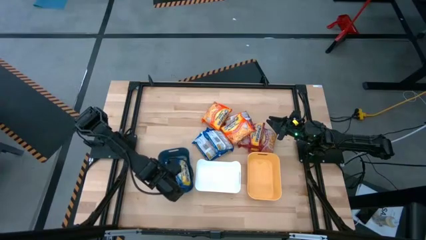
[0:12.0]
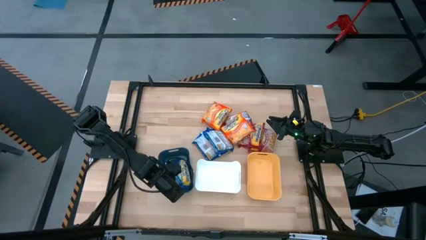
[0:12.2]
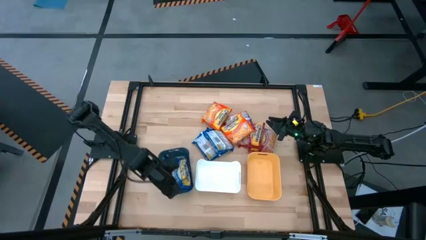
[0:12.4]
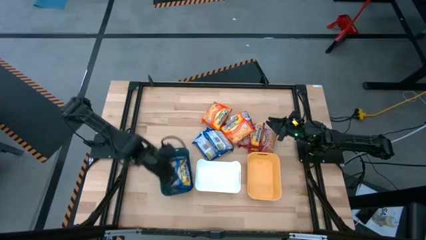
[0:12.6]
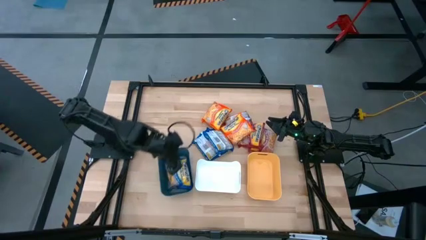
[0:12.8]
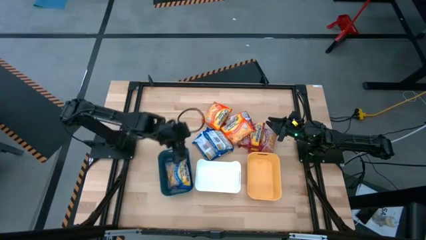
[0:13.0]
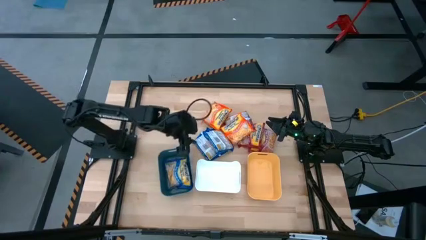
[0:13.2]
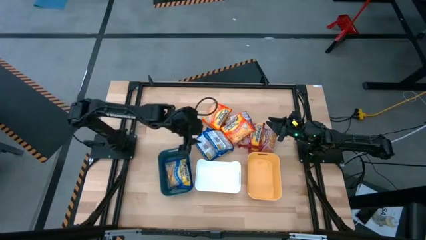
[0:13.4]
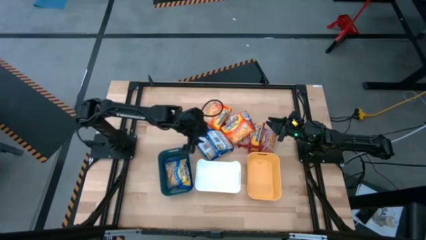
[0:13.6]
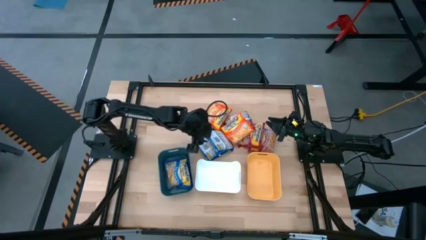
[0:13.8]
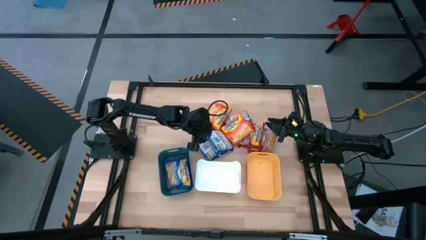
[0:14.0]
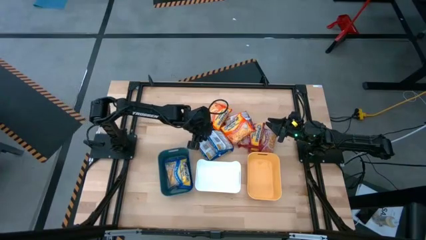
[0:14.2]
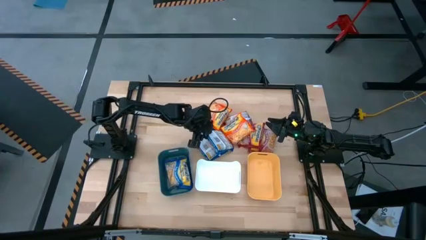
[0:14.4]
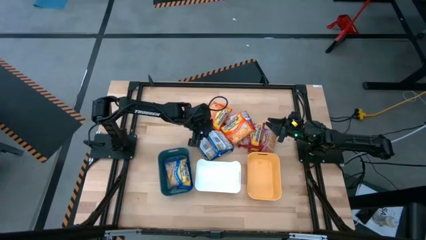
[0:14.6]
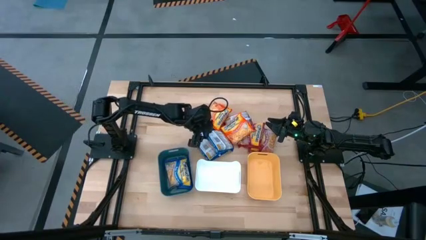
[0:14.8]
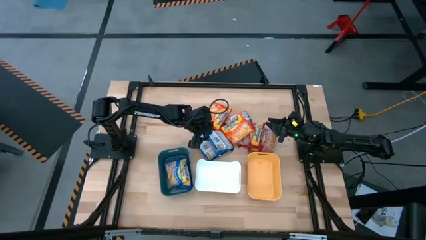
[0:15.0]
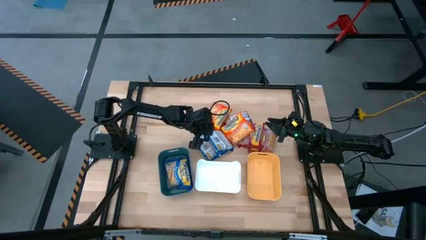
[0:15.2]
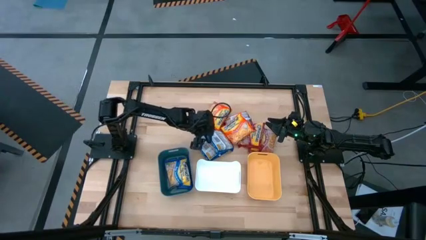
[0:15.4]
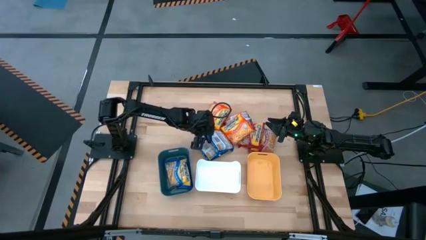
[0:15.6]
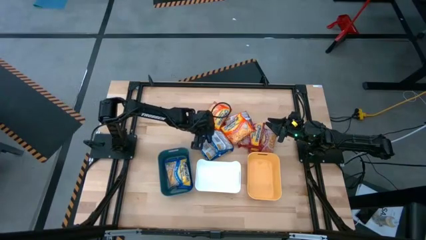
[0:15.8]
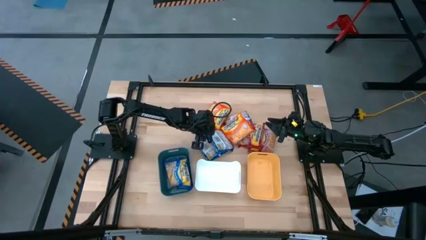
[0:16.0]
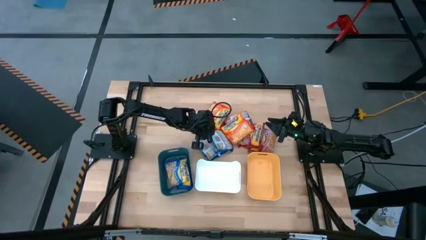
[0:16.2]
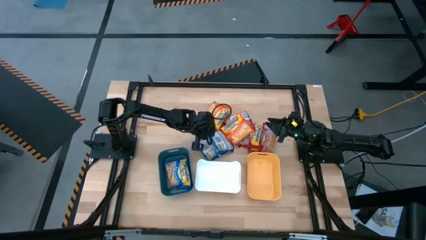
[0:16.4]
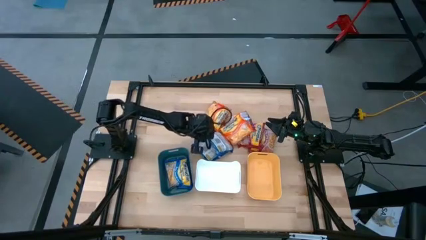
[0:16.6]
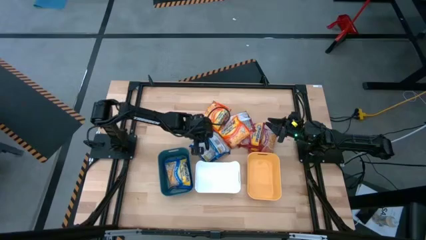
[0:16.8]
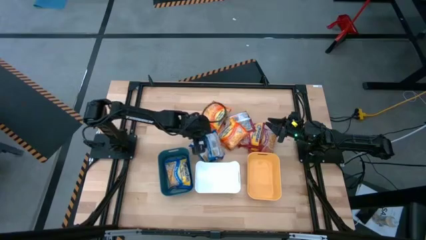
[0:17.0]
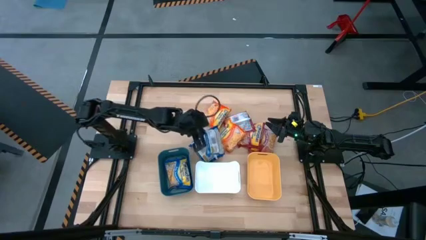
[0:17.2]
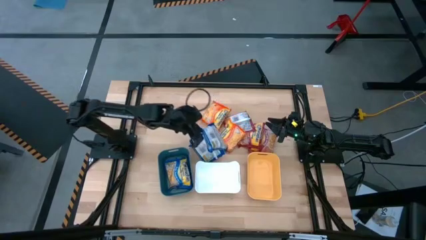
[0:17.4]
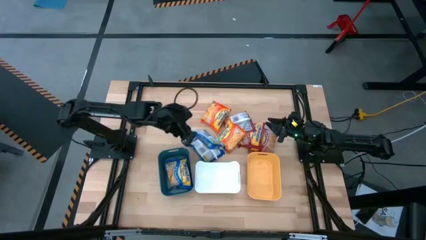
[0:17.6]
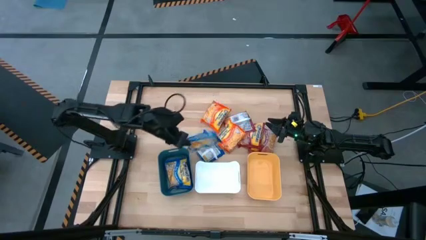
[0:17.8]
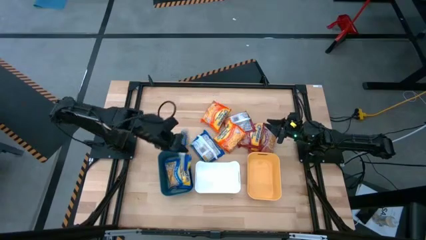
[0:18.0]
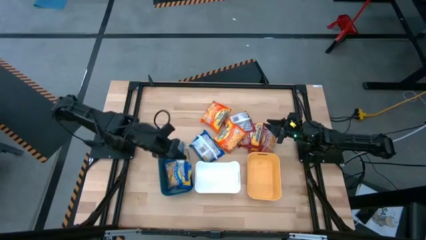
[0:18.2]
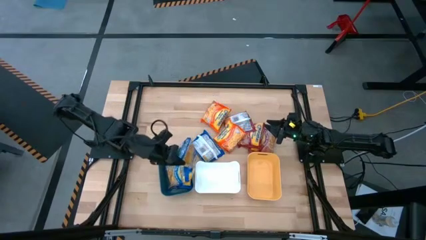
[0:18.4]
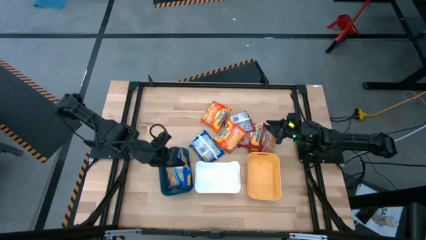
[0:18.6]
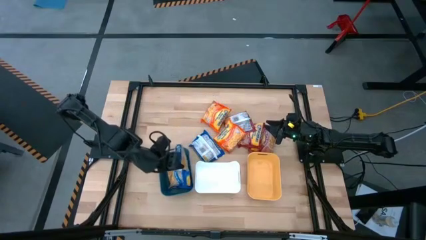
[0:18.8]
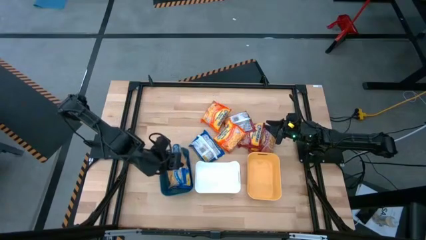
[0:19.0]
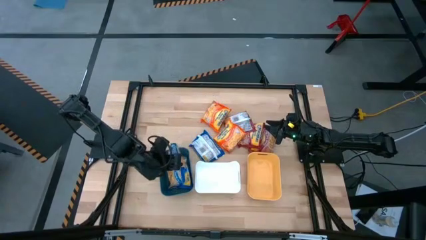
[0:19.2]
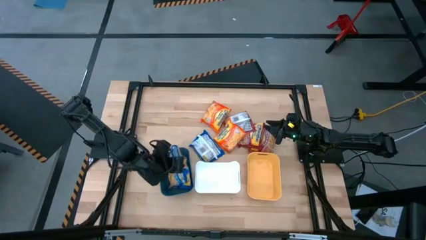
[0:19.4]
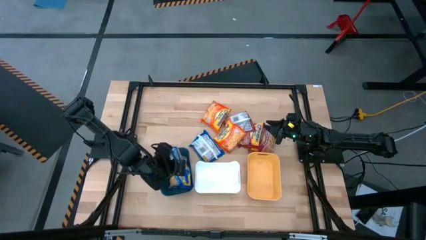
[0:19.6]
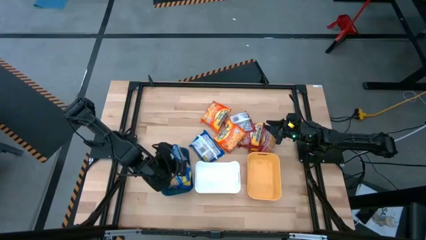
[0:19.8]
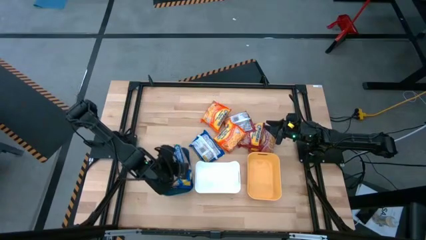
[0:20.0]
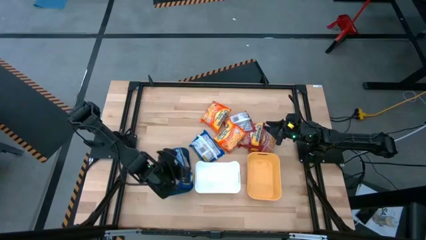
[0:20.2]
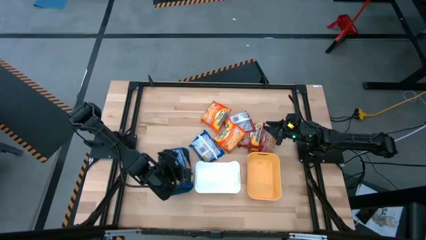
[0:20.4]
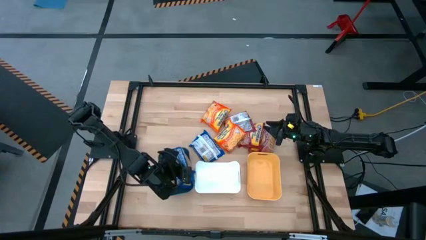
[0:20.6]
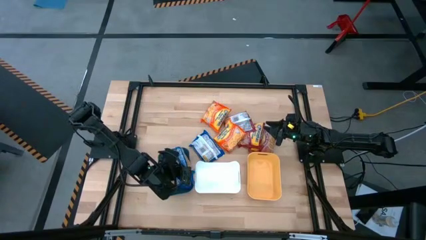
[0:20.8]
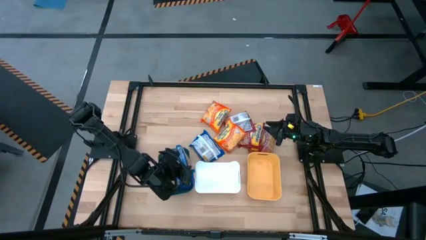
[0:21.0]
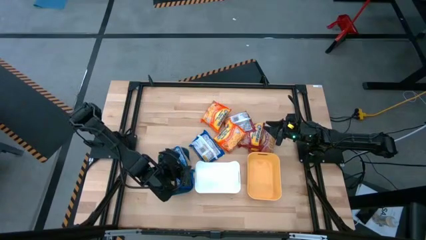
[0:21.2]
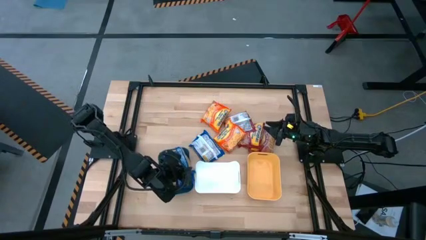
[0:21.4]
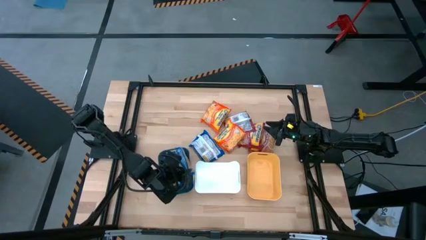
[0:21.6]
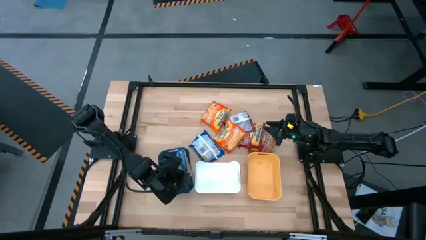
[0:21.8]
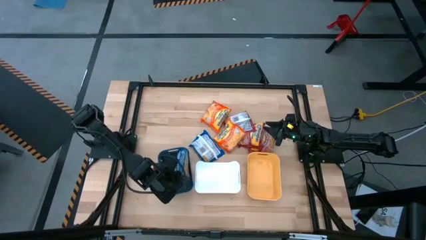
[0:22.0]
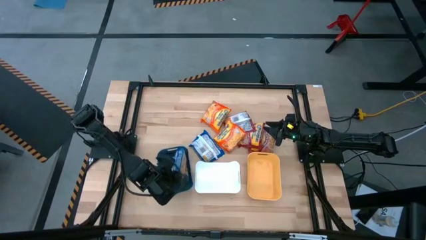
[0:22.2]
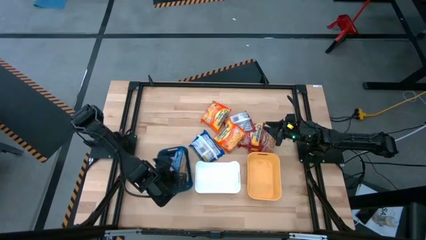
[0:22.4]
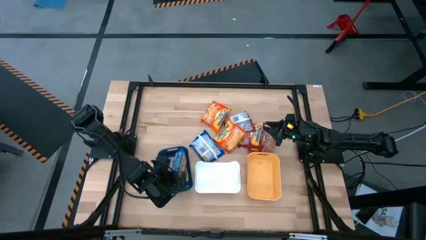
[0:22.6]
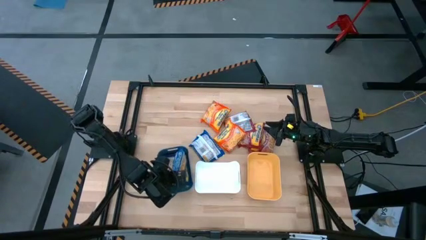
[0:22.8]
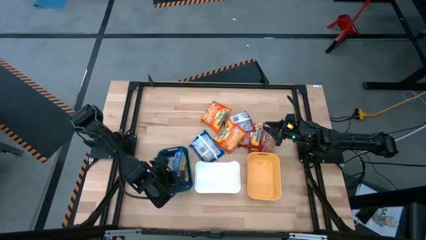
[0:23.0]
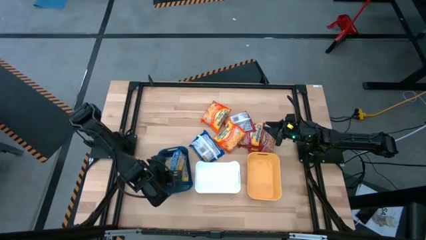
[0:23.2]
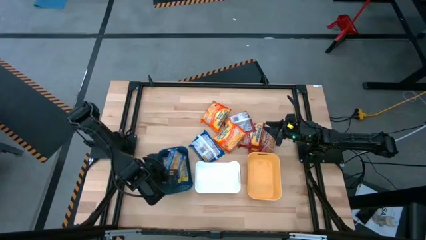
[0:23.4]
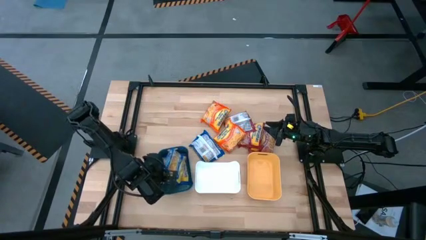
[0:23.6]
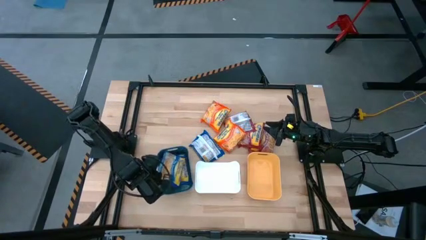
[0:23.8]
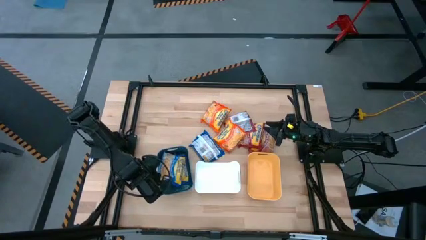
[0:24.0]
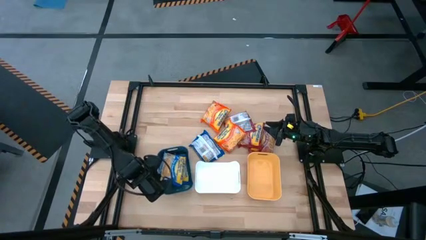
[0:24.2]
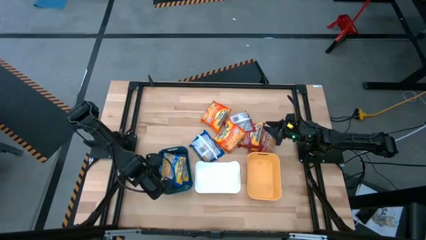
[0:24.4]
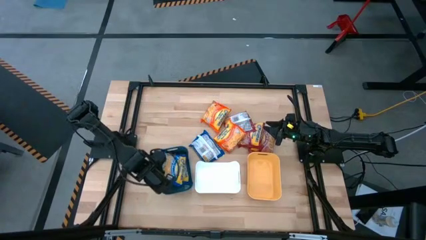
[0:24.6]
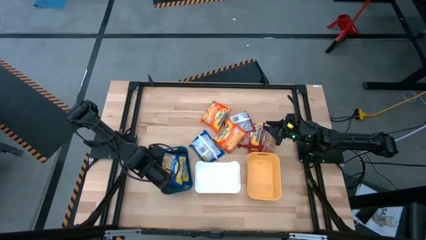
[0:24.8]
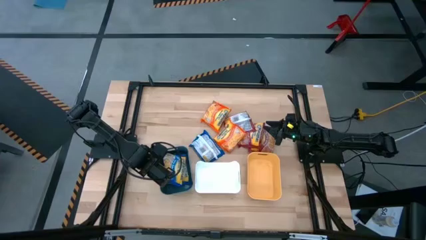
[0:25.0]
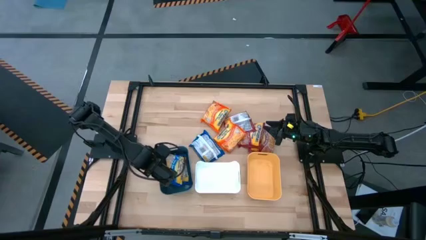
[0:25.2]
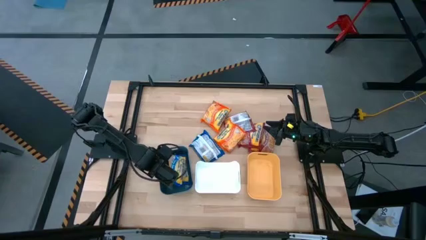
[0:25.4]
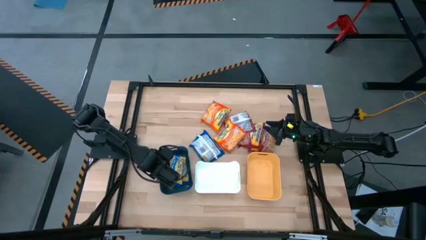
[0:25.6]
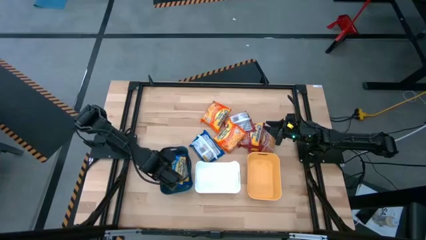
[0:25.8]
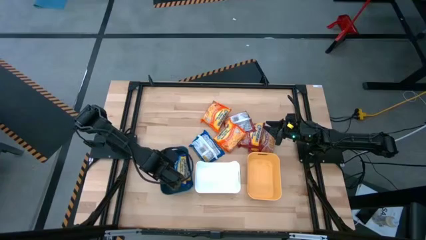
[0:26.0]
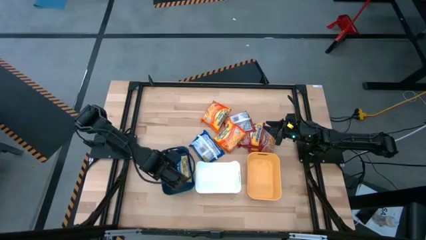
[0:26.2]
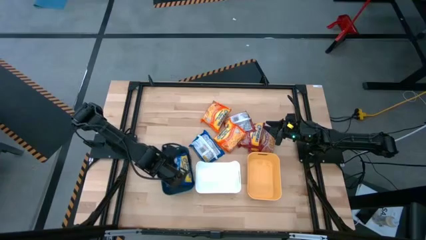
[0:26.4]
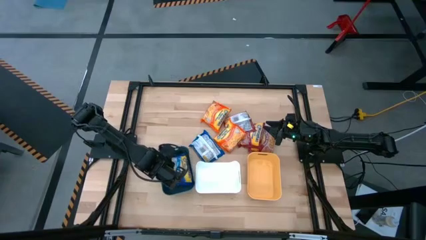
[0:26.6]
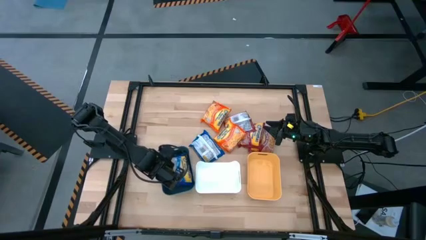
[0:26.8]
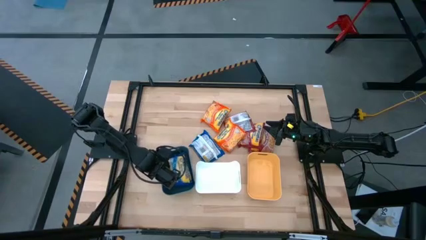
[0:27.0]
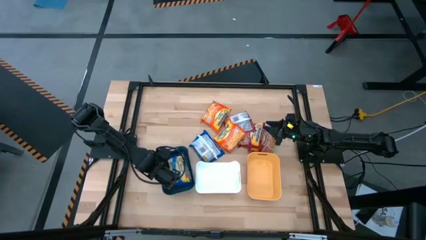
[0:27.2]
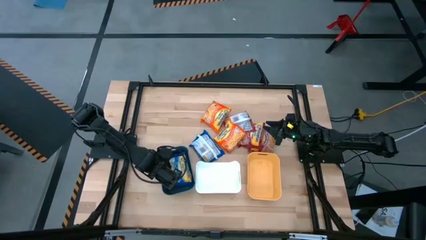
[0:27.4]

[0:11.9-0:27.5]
Task: Sort Maruchan noodles
Put the right blue noodle pack into the blue bin
